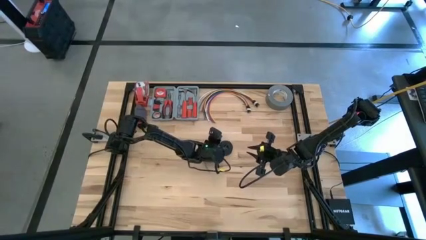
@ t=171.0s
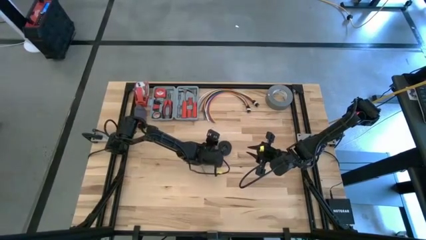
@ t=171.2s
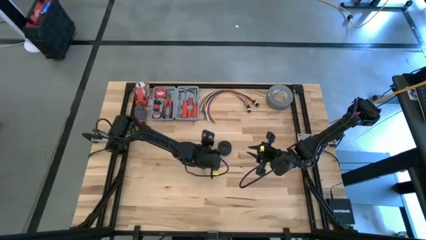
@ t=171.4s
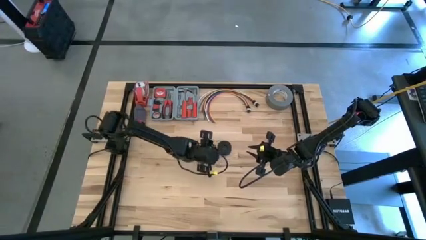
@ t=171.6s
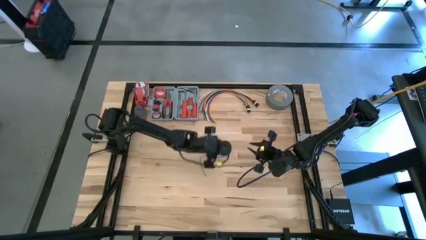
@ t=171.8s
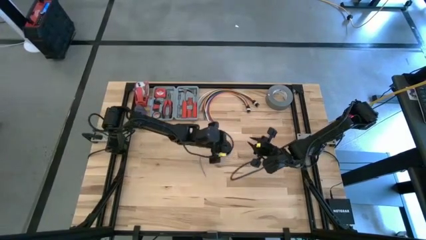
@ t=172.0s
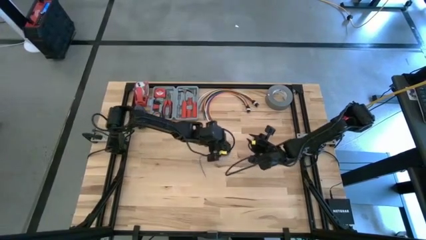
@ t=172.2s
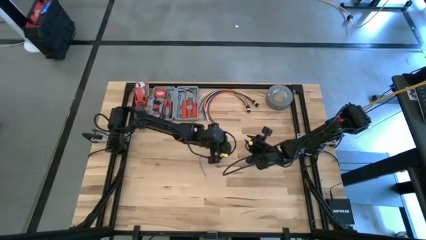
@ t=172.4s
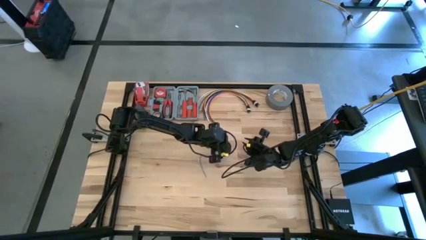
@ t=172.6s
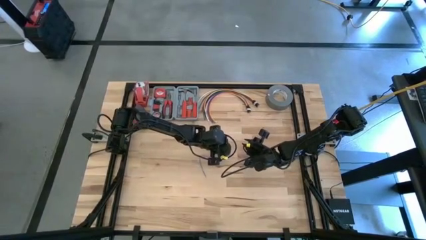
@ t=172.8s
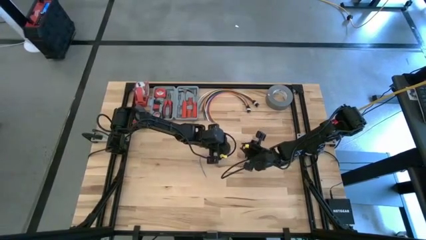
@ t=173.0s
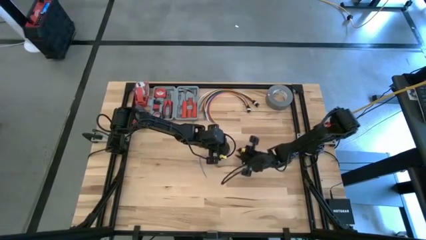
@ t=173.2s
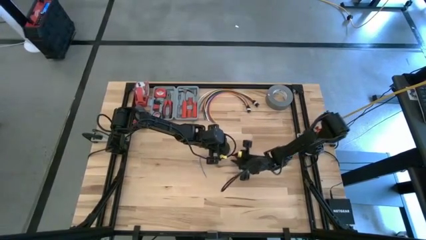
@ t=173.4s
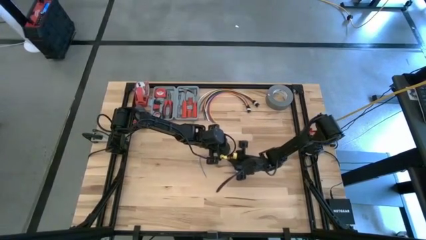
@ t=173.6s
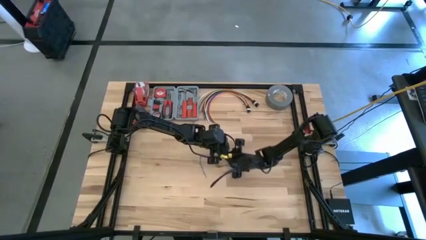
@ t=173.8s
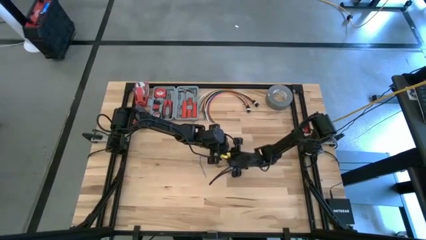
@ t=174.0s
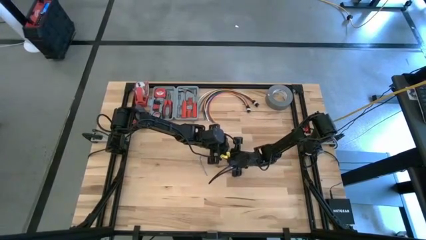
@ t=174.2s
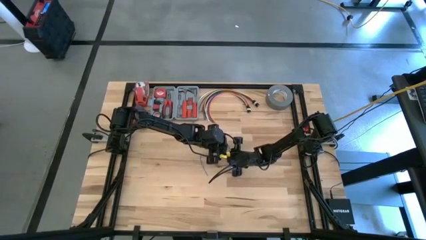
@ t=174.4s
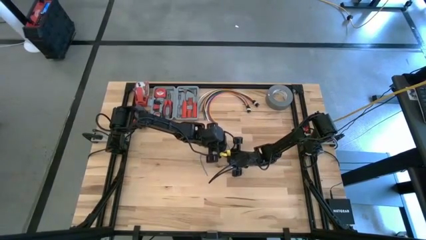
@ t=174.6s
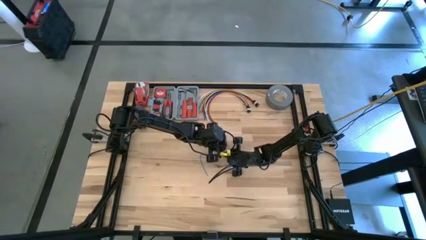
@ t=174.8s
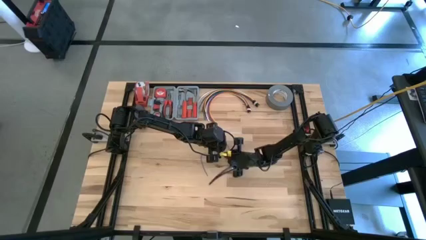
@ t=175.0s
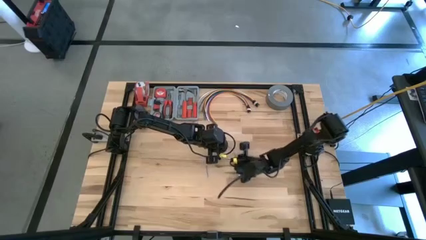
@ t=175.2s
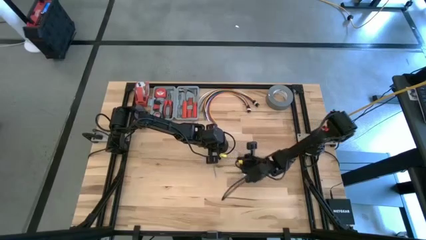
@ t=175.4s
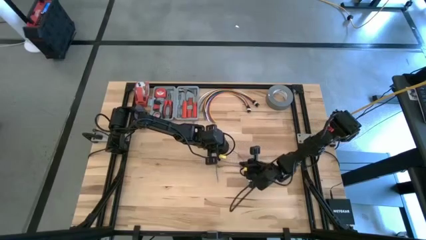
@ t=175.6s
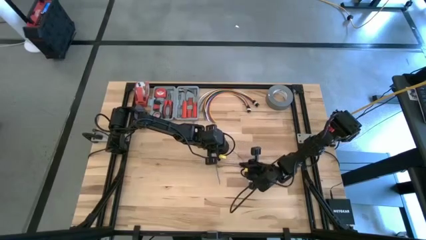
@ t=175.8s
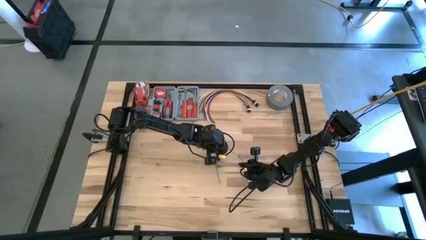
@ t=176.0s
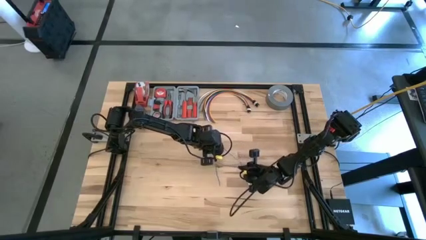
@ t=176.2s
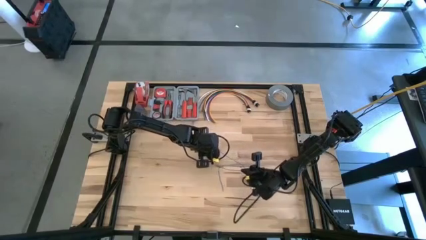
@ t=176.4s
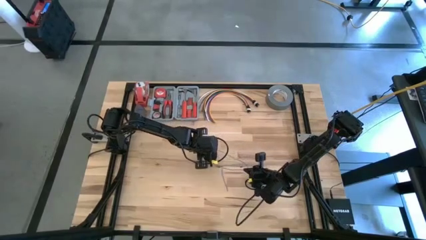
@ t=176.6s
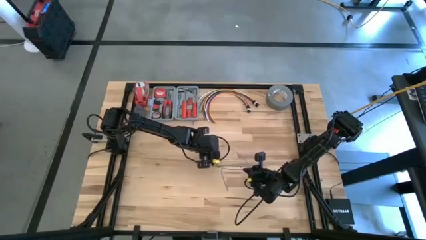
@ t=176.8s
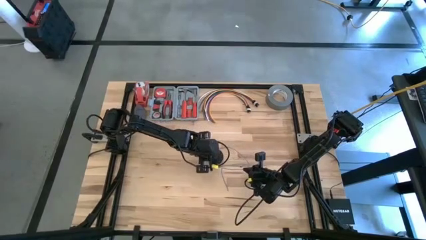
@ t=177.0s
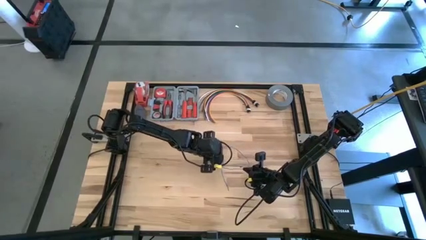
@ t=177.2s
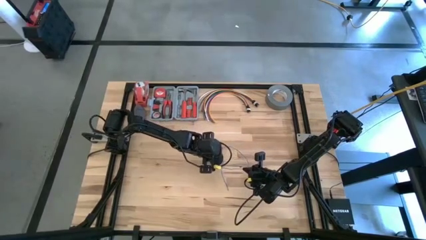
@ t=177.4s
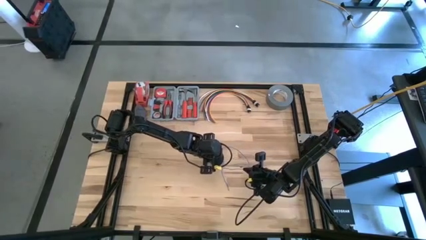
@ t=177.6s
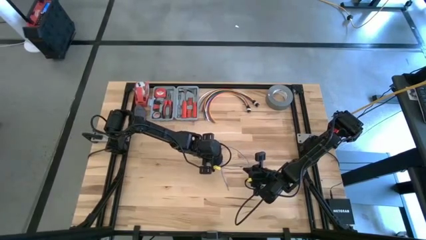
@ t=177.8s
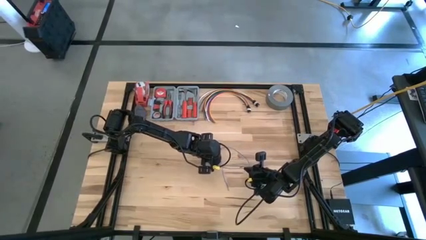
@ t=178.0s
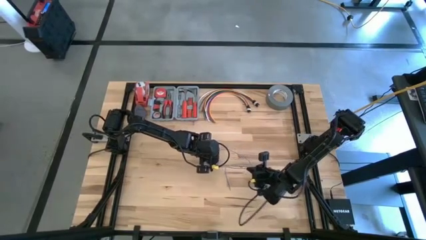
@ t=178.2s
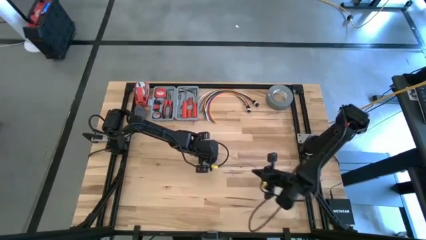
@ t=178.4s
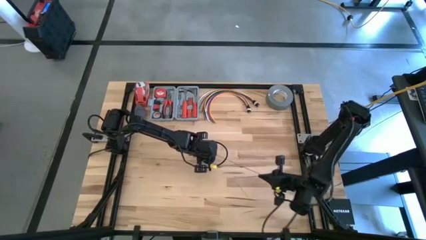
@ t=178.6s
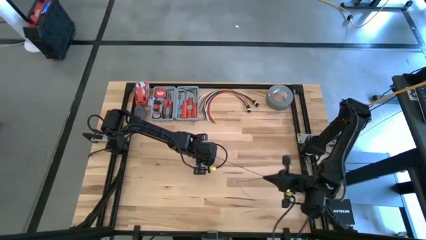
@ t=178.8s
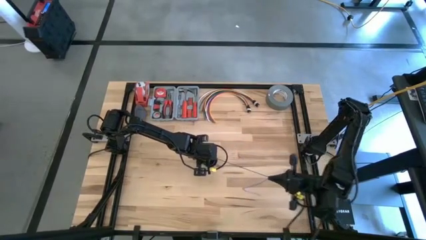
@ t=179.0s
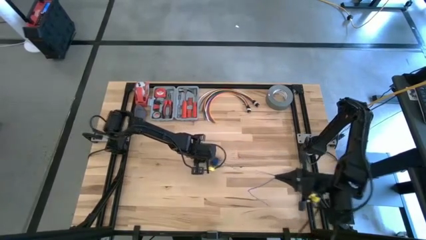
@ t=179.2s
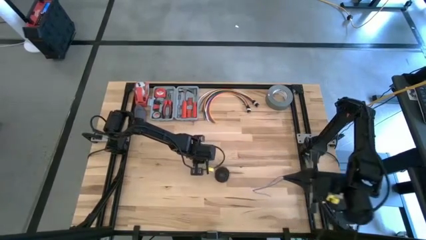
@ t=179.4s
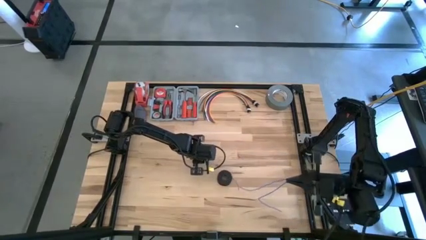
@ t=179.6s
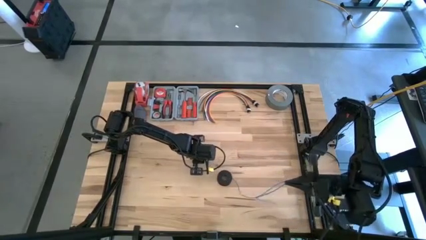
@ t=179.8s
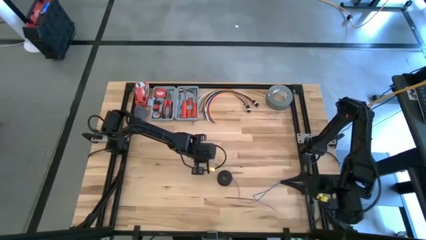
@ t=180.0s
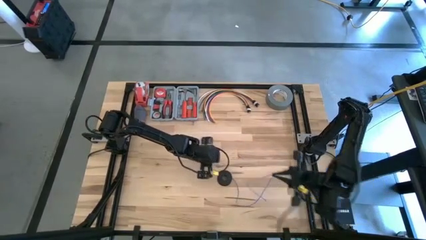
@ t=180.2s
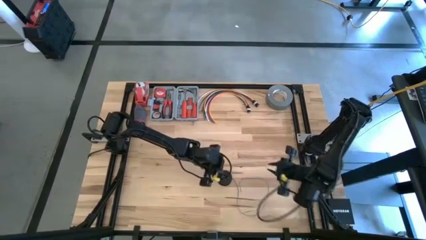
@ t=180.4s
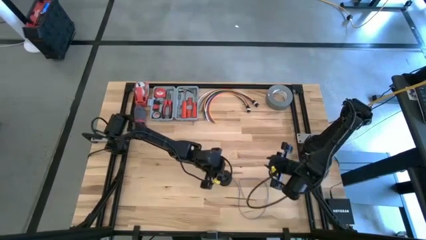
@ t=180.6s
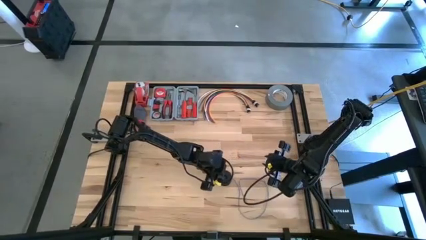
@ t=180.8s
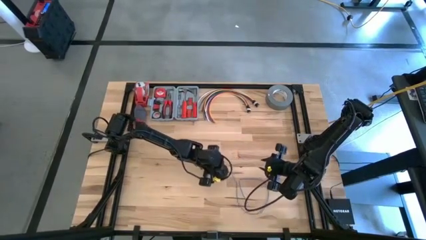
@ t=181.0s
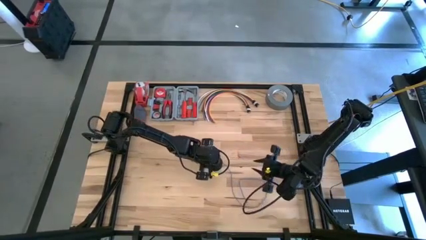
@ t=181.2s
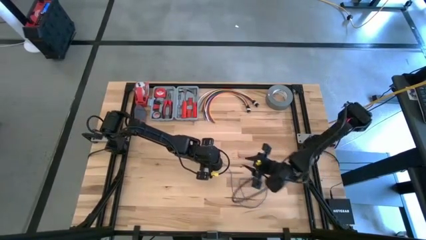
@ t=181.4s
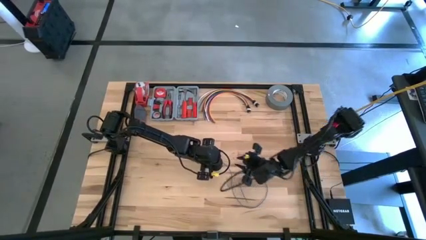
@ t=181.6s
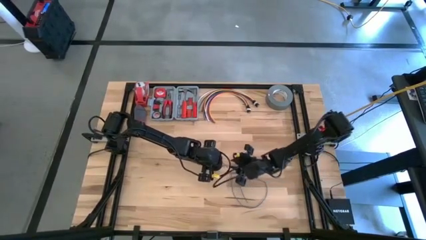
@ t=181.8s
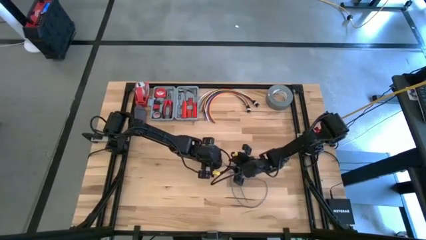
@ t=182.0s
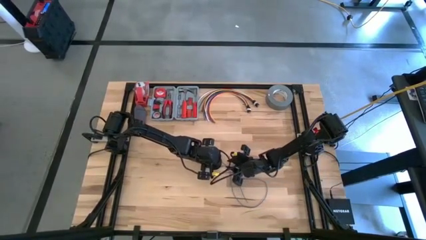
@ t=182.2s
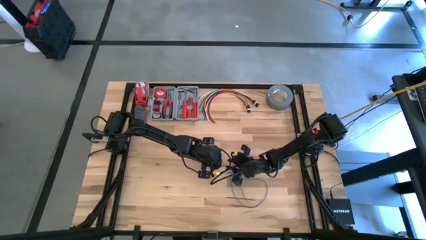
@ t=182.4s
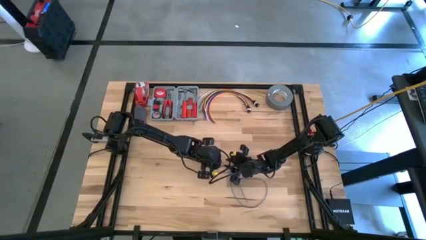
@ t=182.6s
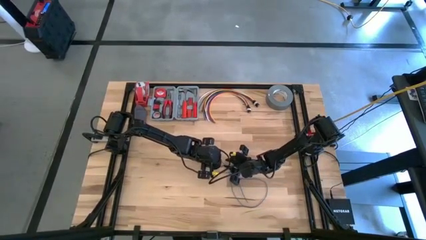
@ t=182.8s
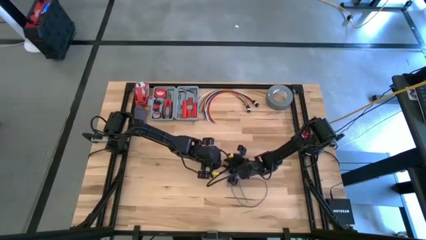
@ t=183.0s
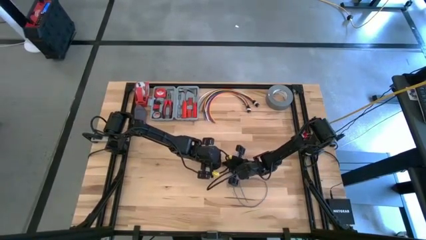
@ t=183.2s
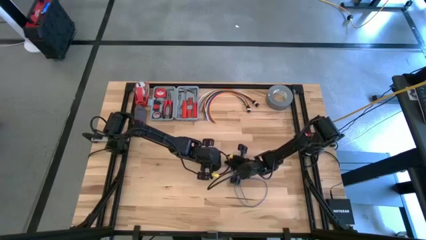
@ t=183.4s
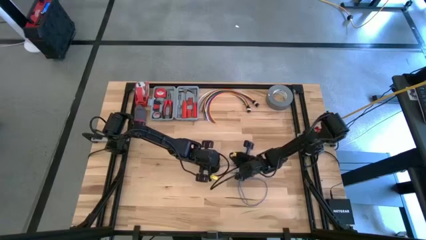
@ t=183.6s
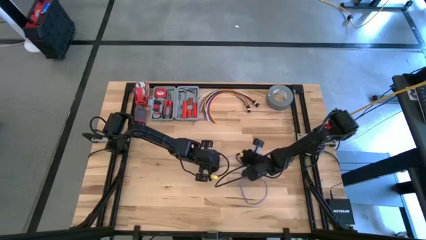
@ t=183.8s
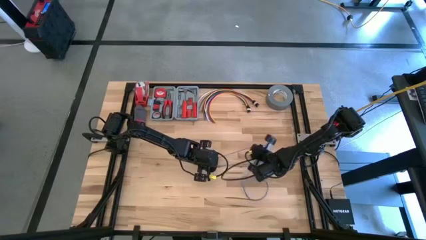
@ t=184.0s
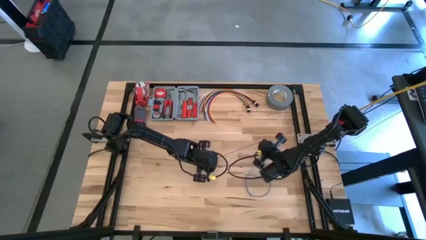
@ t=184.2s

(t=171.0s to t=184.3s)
Task: Coil cords
Uncoil the blue wire on the black spool

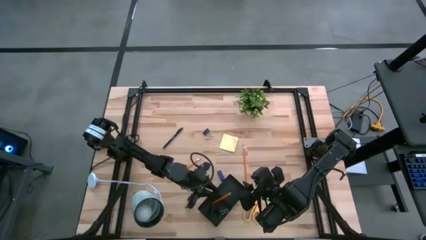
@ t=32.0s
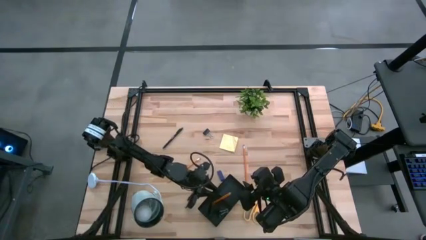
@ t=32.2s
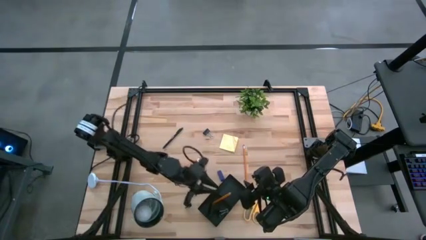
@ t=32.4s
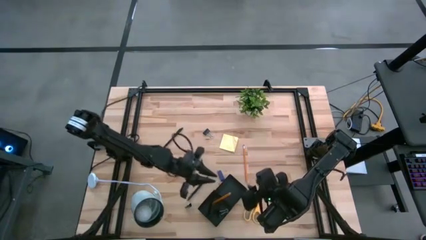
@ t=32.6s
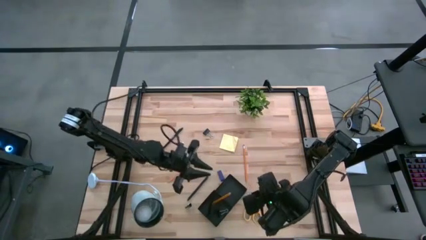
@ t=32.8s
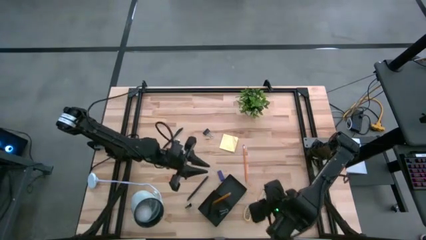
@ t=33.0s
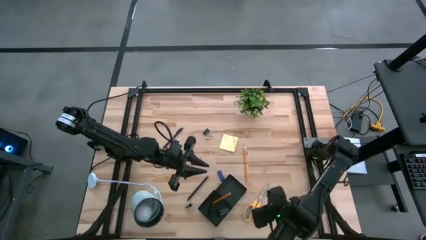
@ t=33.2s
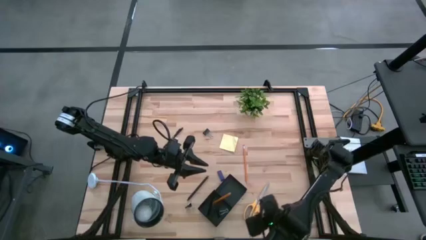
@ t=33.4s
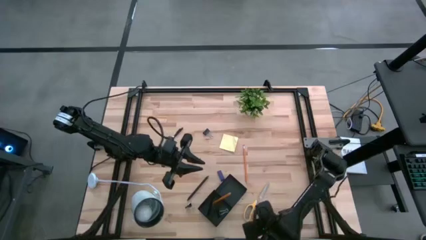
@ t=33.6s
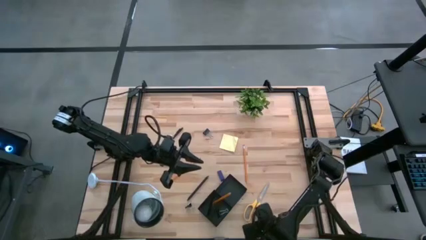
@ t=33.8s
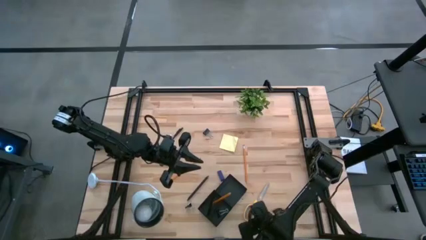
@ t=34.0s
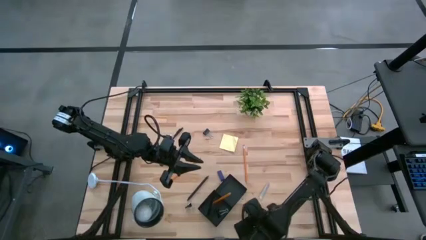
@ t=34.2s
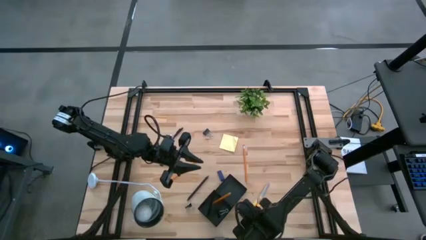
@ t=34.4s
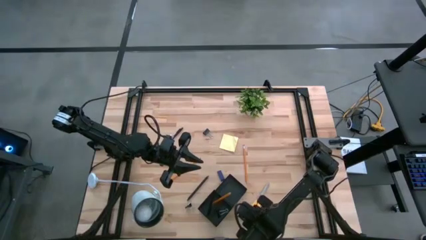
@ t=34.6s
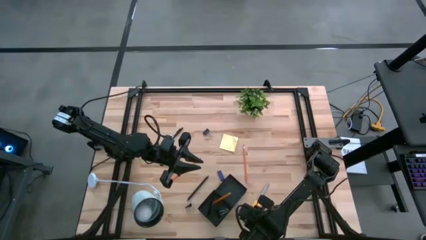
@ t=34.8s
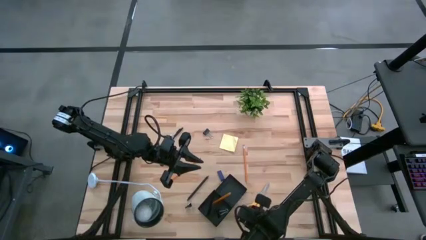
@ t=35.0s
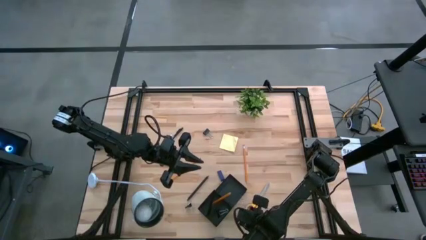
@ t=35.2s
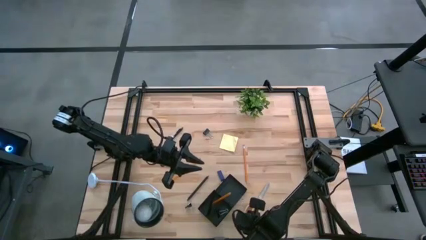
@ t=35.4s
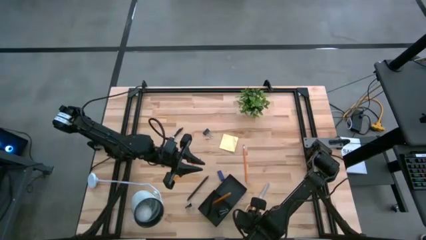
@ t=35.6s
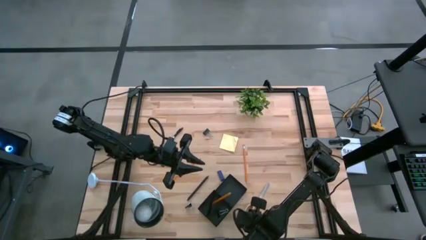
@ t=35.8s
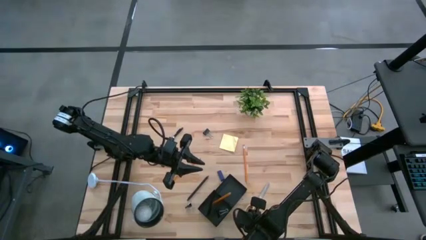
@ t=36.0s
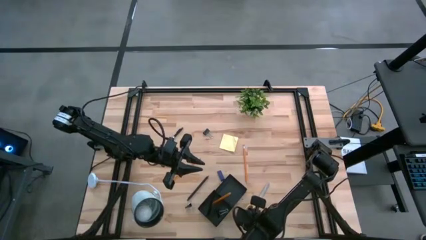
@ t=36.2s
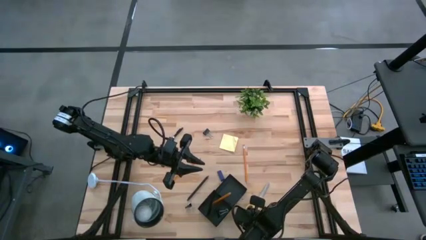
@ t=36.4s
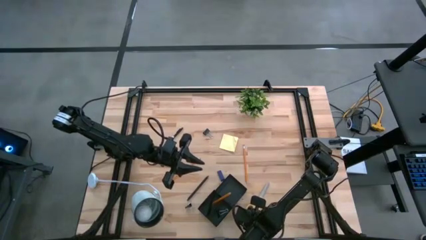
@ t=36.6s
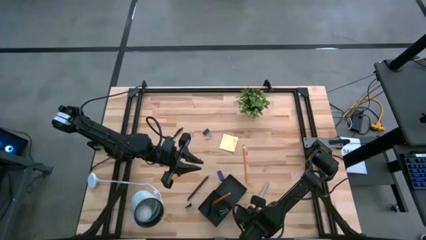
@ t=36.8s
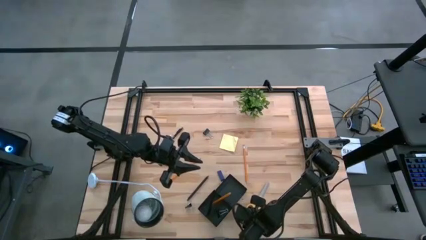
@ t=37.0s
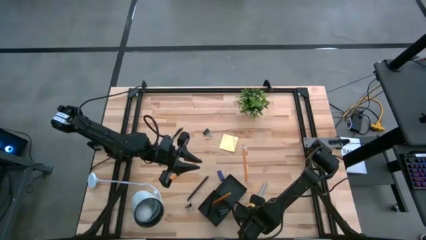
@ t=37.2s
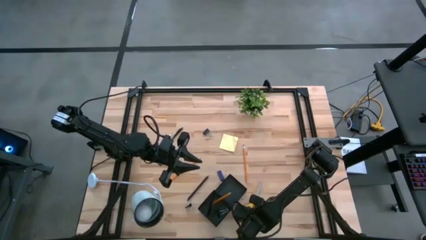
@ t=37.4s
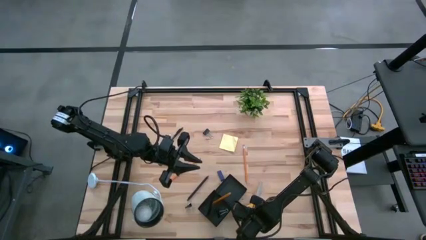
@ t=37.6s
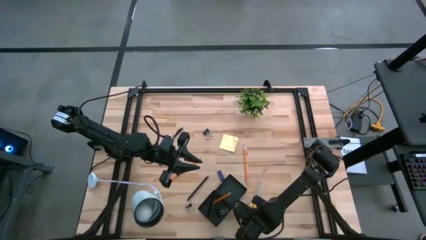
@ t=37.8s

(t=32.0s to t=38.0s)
Task: Pick and place office supplies into organizer
Put the scissors into the desk organizer
